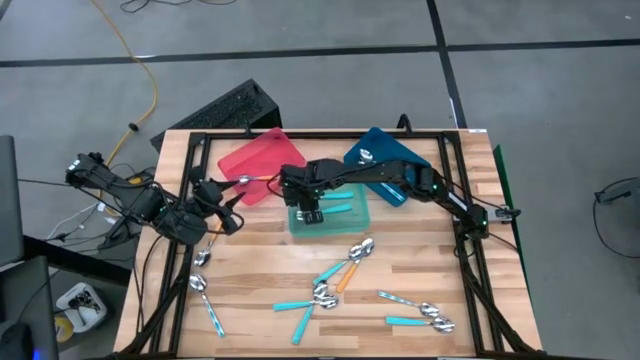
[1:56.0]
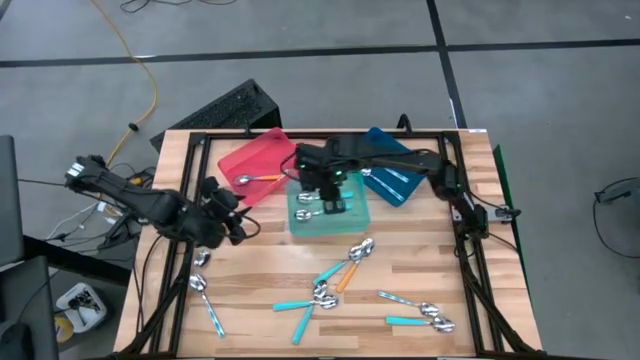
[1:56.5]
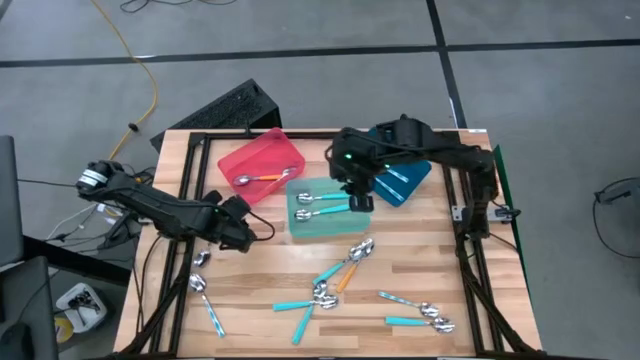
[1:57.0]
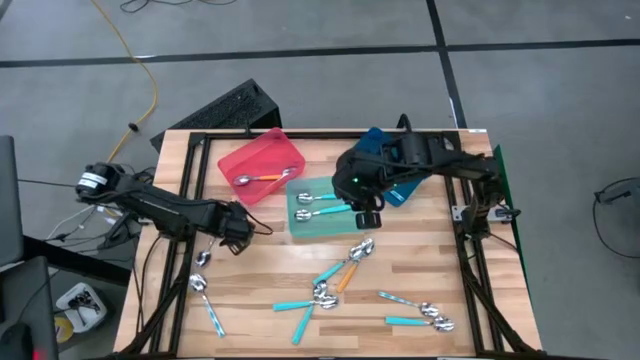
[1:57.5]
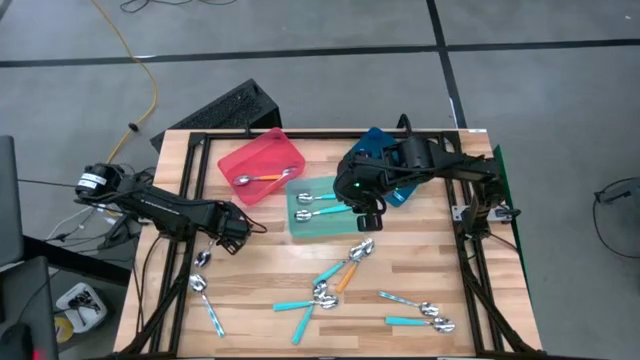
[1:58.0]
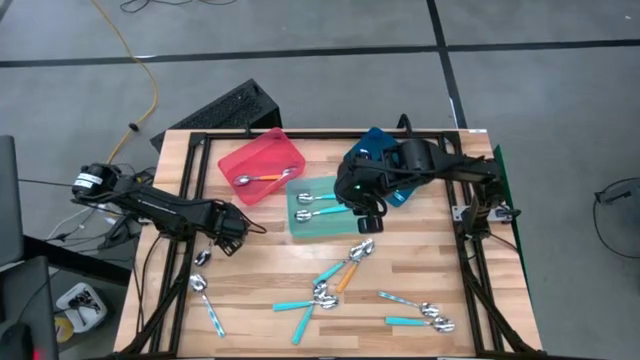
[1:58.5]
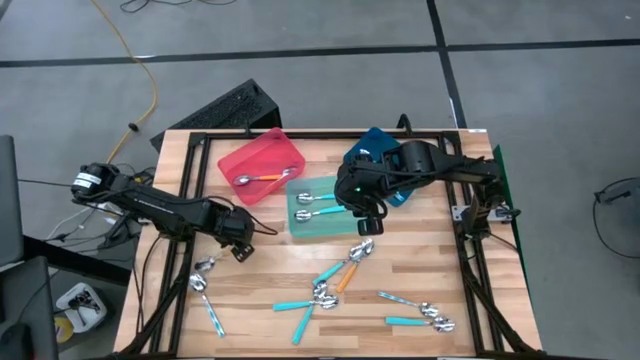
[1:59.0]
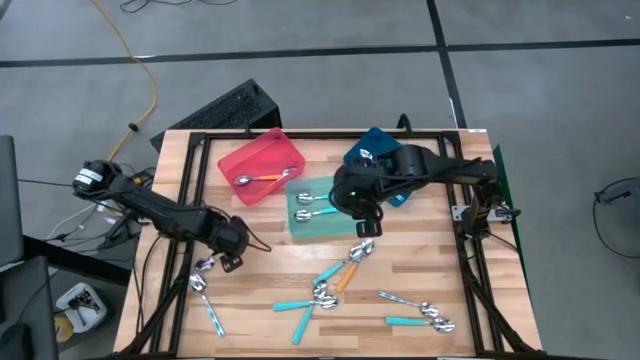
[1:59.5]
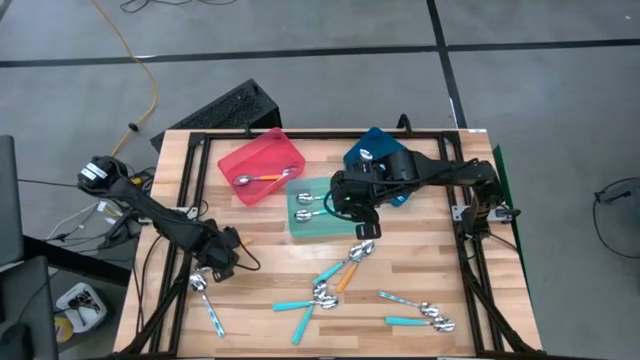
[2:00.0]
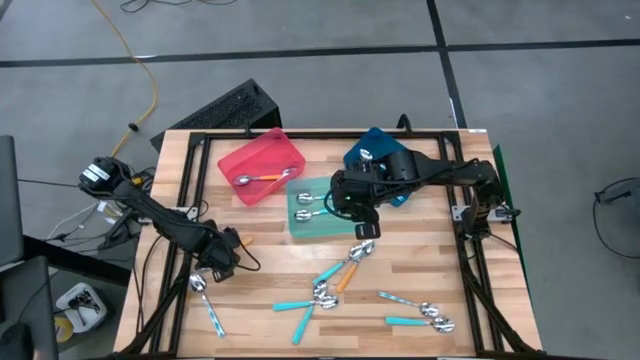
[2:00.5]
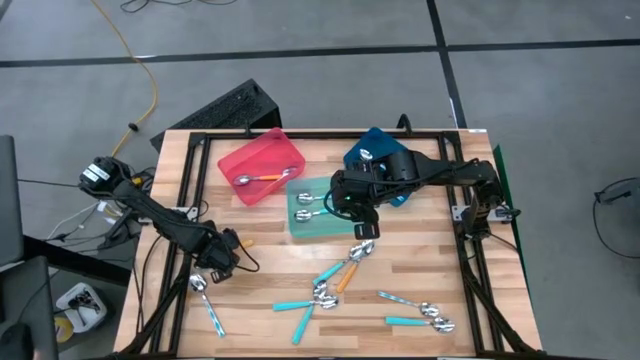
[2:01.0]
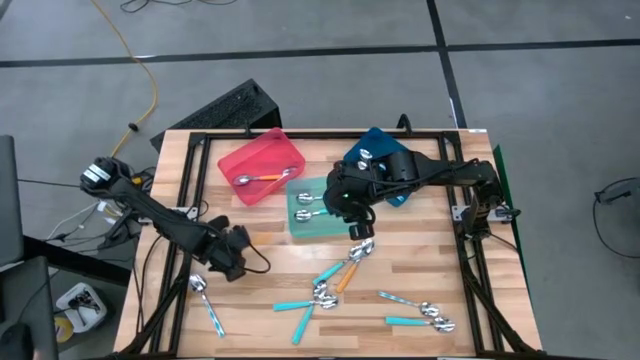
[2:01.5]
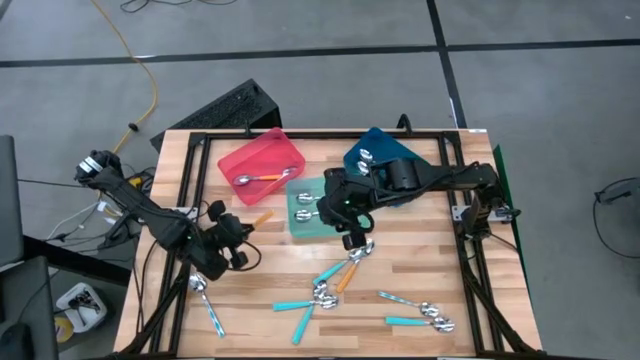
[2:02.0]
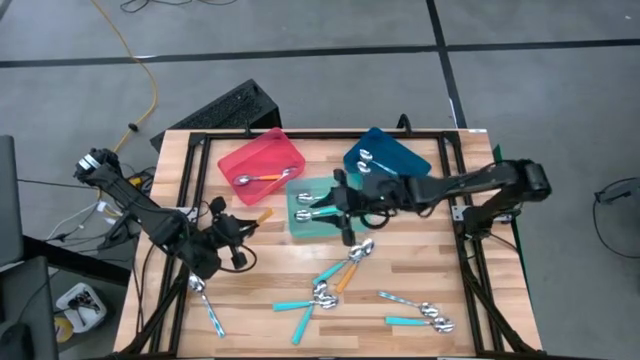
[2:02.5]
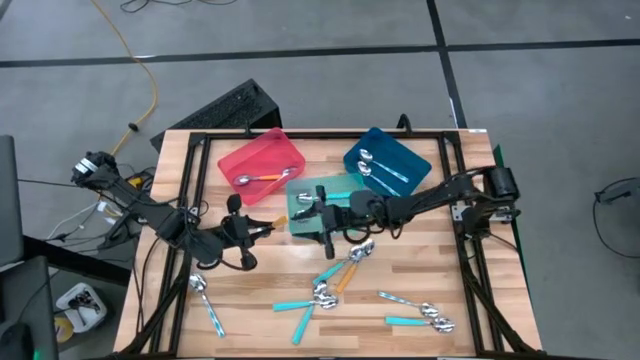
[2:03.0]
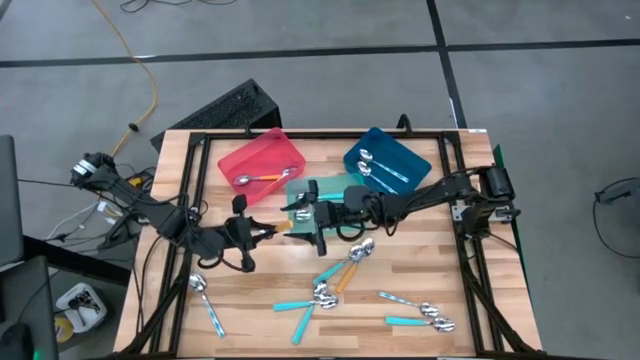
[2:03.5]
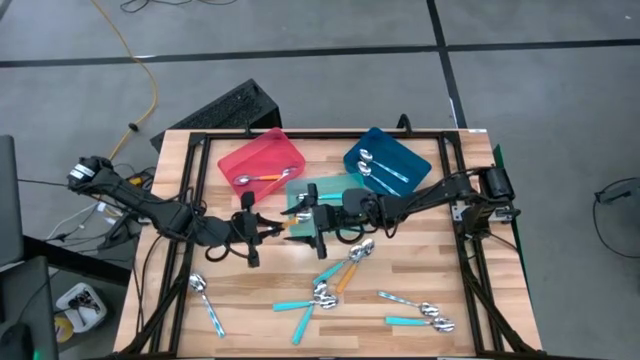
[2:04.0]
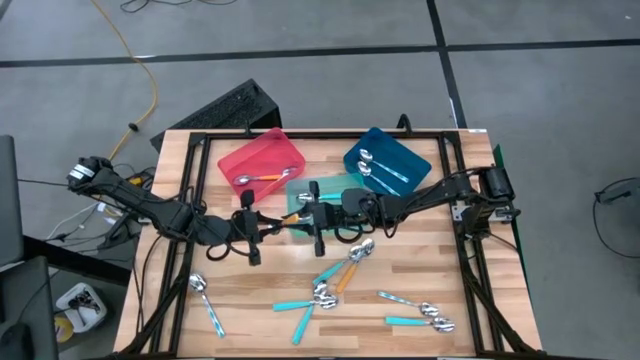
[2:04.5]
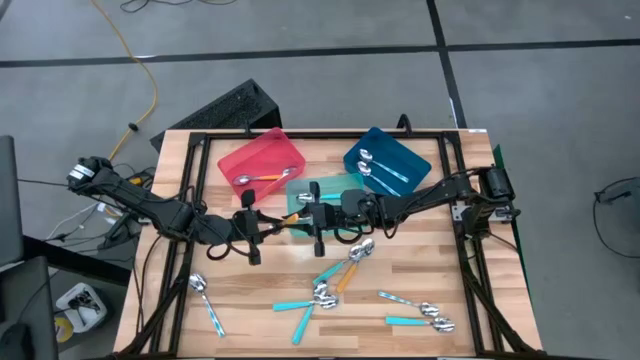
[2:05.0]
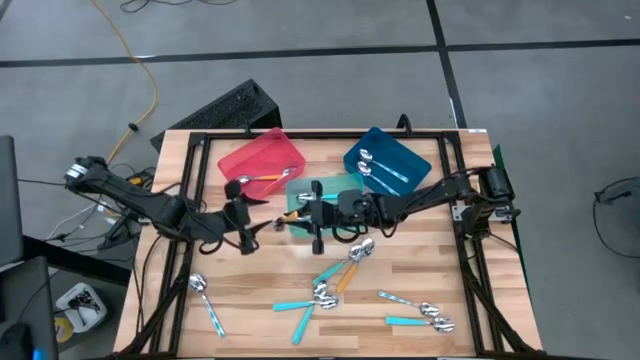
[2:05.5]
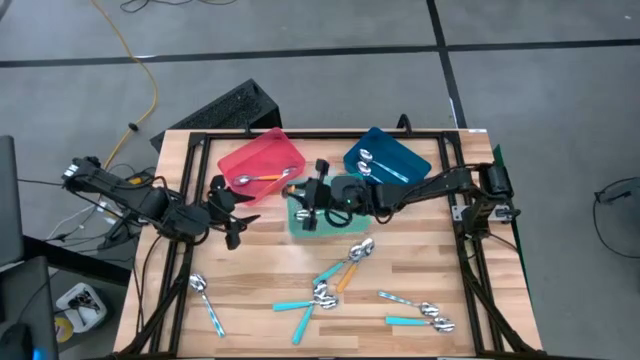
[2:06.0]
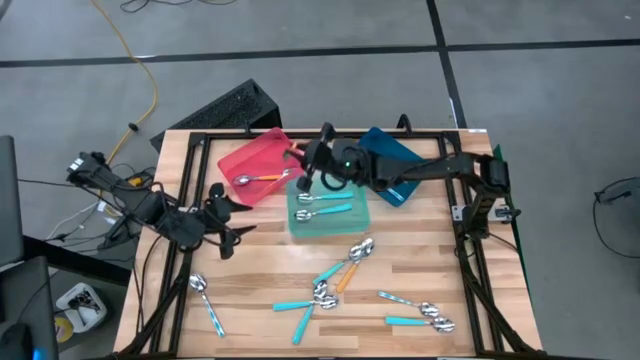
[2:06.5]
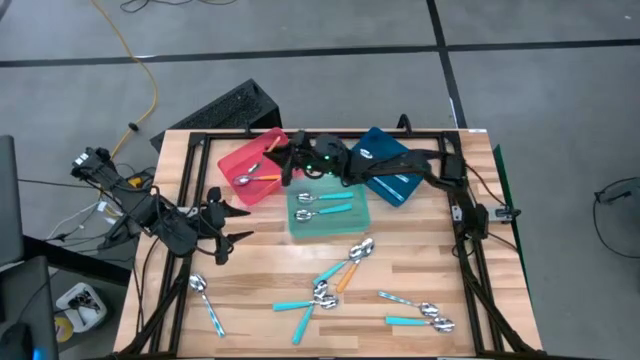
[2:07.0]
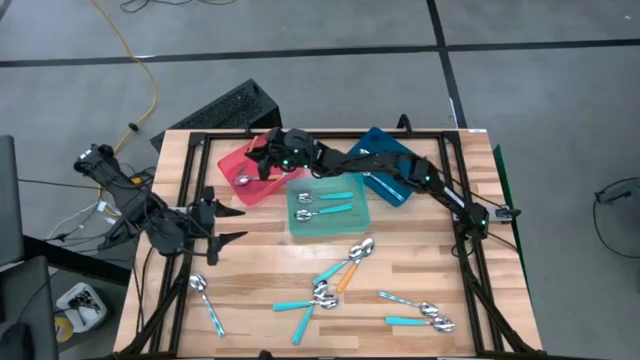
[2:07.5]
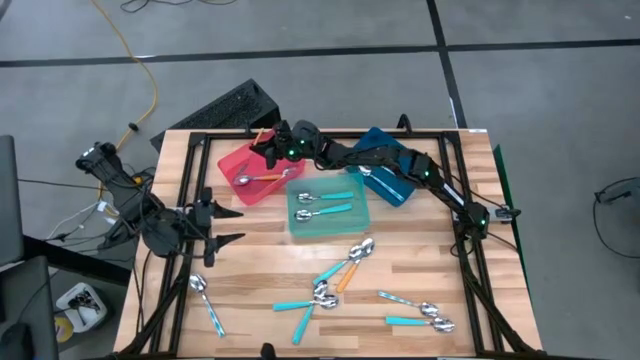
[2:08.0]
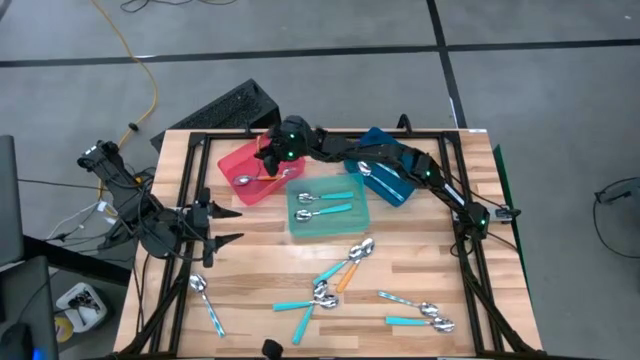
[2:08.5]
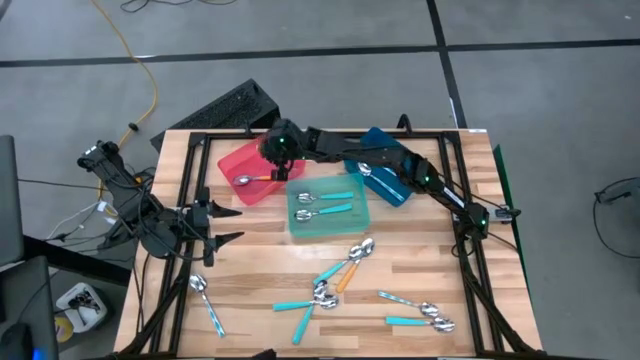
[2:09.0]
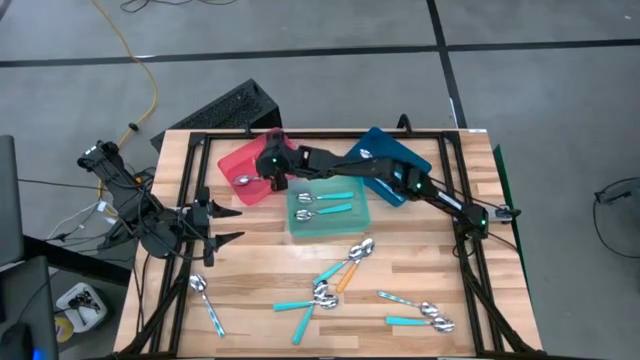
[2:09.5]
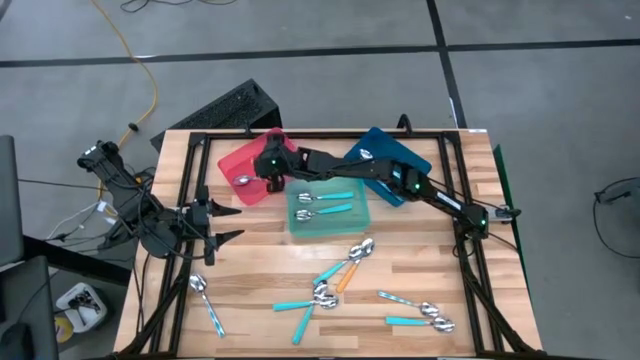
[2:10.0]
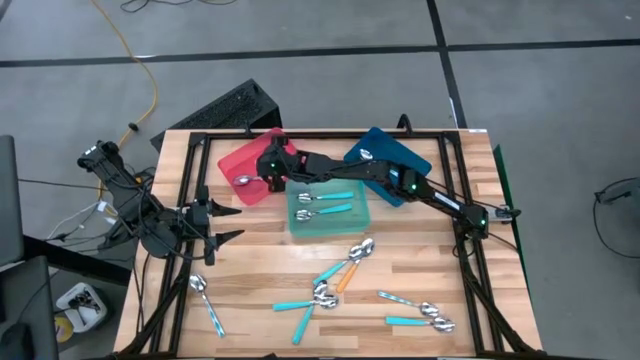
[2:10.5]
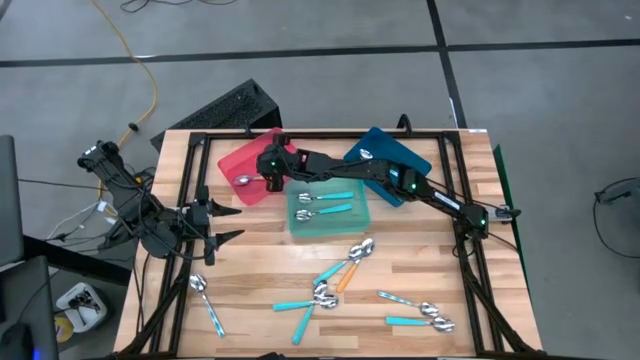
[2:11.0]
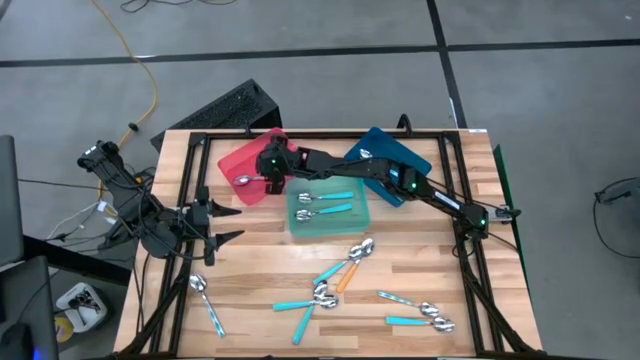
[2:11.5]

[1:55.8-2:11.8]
Task: Sort silverware by color (type)
Put the left orange spoon into the red bin
